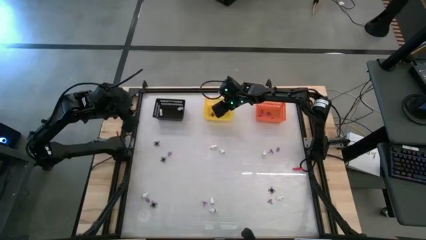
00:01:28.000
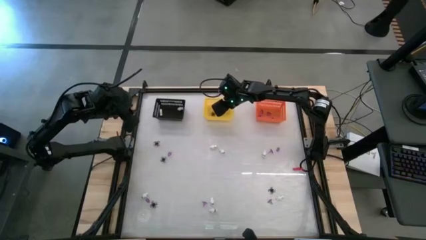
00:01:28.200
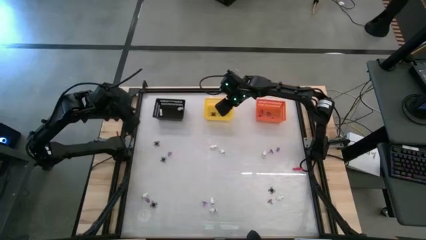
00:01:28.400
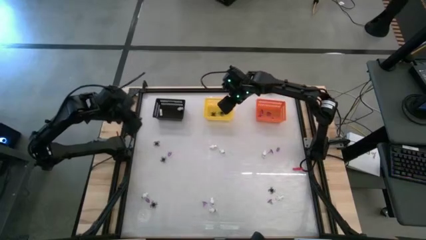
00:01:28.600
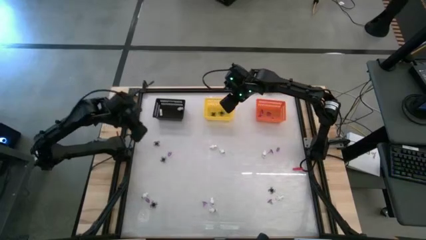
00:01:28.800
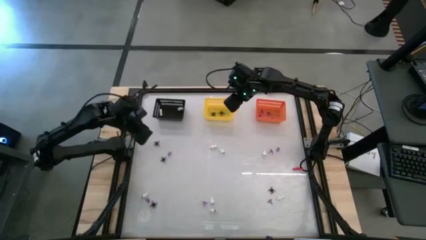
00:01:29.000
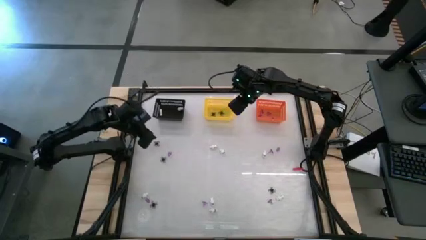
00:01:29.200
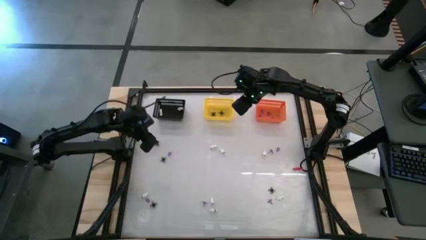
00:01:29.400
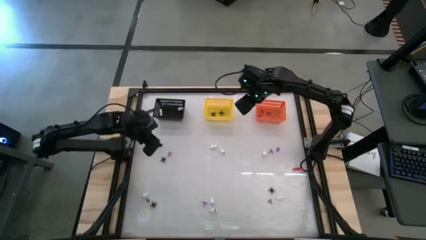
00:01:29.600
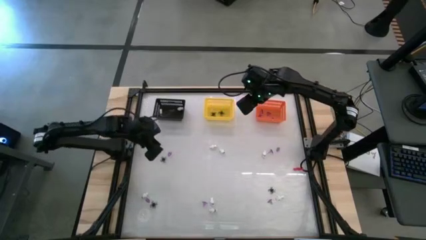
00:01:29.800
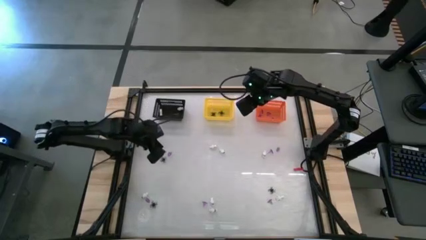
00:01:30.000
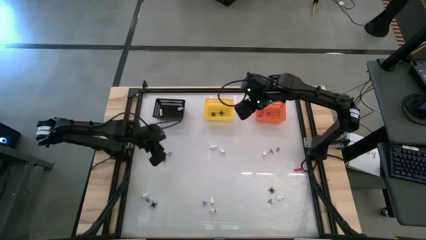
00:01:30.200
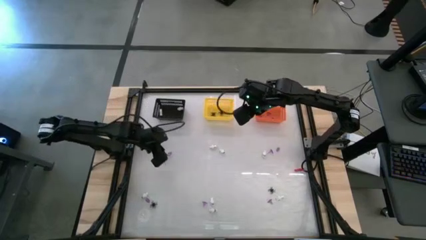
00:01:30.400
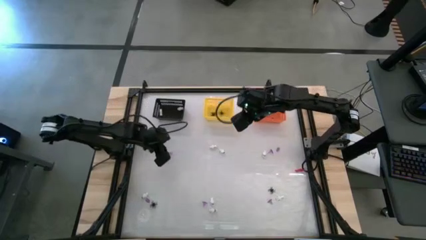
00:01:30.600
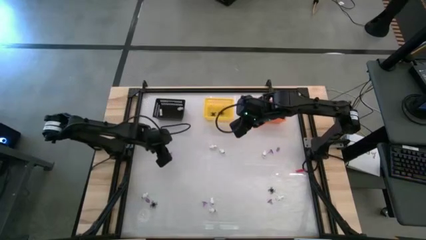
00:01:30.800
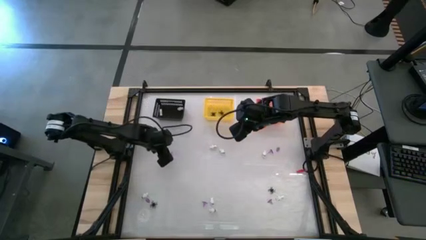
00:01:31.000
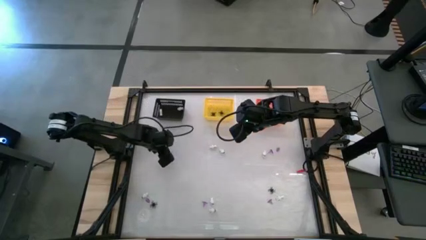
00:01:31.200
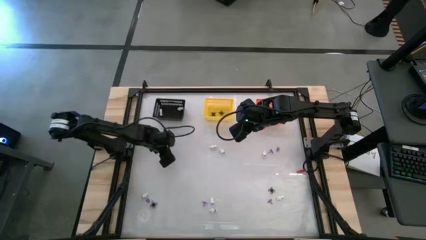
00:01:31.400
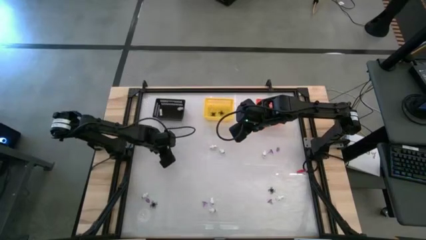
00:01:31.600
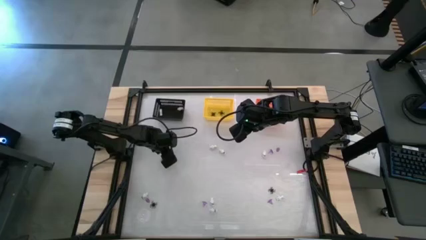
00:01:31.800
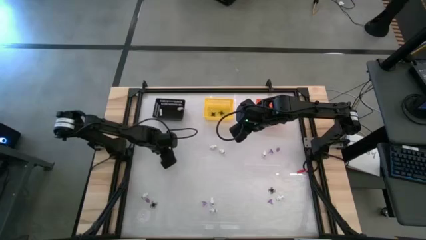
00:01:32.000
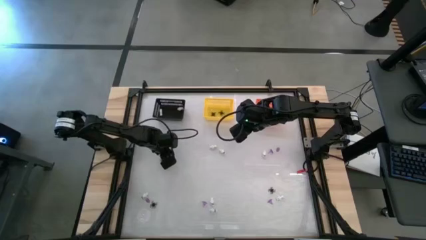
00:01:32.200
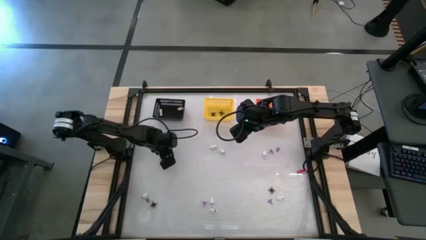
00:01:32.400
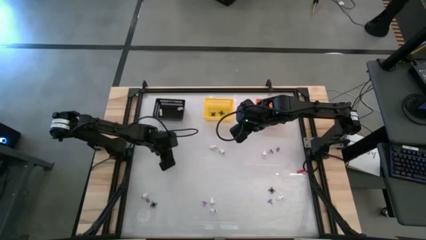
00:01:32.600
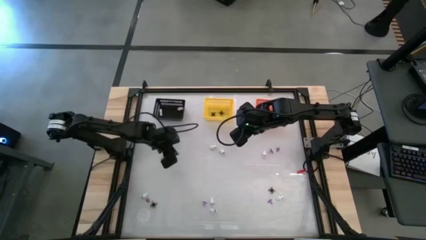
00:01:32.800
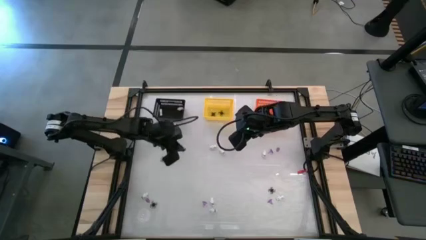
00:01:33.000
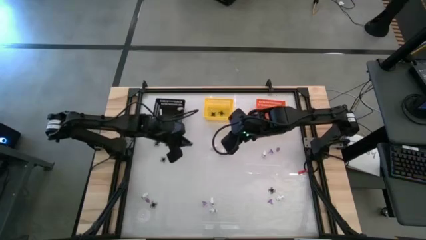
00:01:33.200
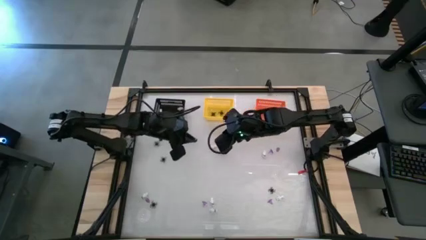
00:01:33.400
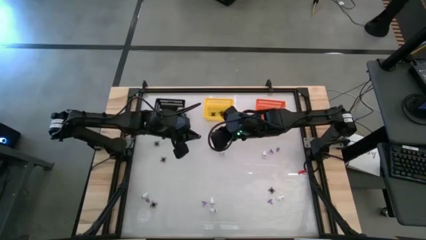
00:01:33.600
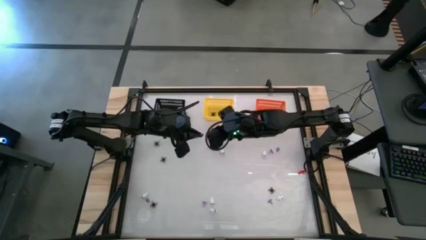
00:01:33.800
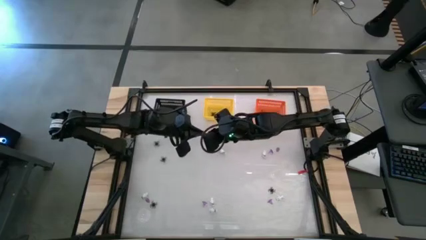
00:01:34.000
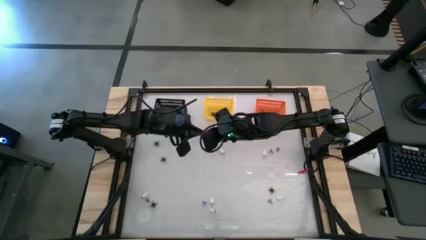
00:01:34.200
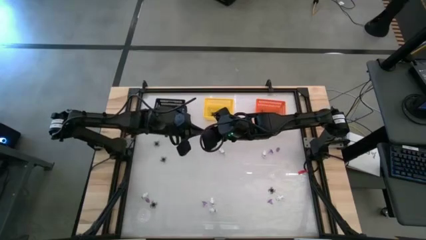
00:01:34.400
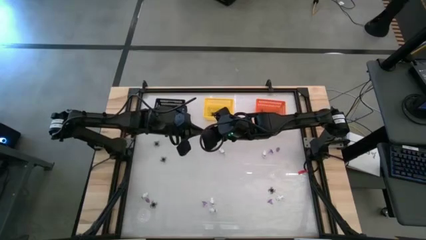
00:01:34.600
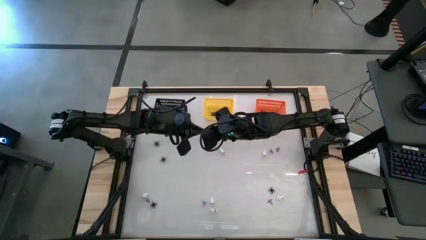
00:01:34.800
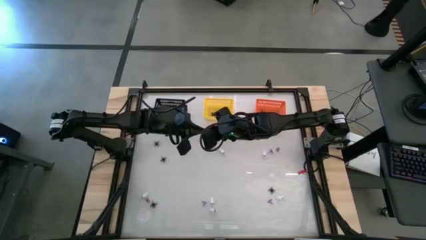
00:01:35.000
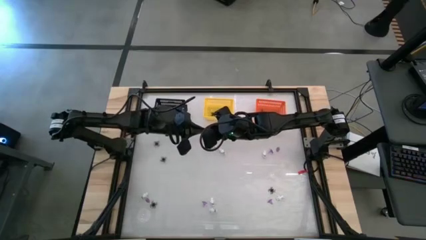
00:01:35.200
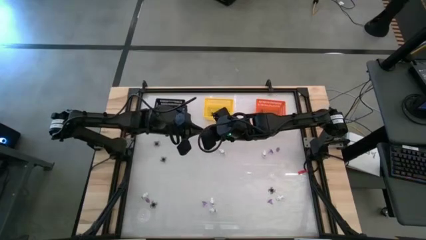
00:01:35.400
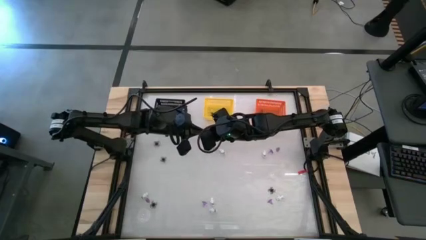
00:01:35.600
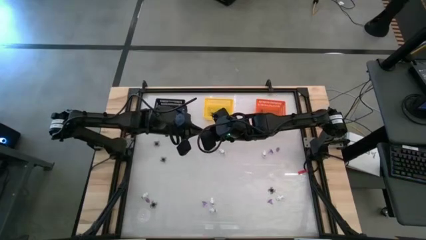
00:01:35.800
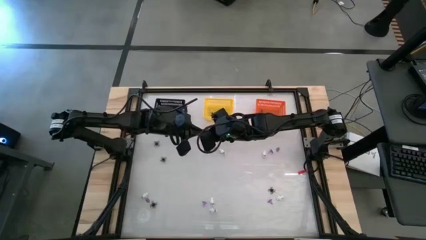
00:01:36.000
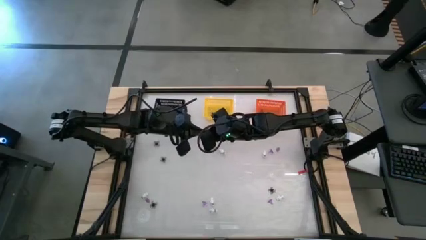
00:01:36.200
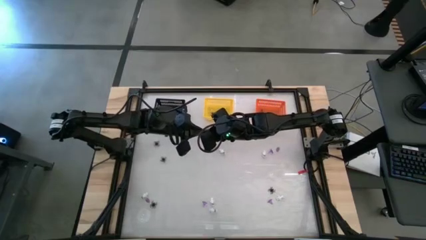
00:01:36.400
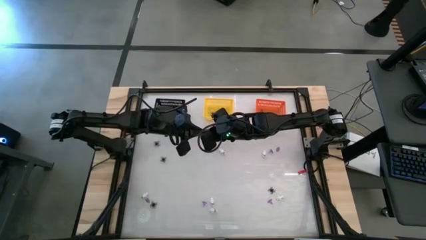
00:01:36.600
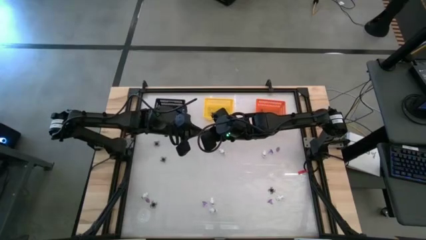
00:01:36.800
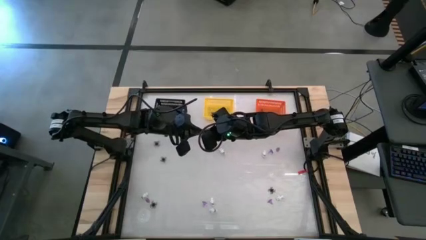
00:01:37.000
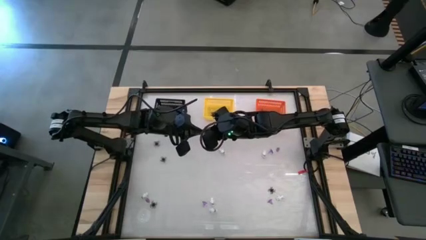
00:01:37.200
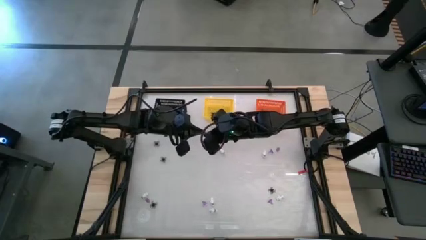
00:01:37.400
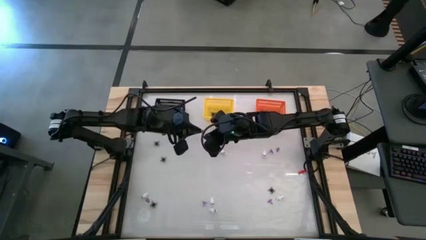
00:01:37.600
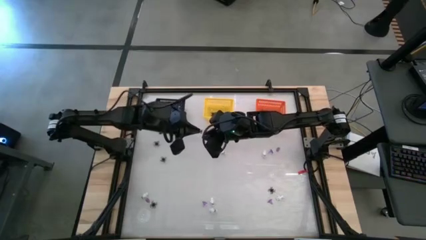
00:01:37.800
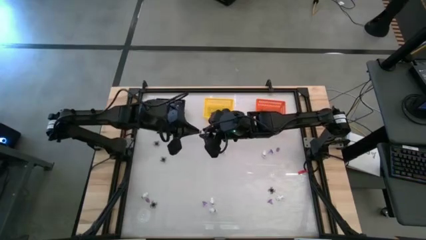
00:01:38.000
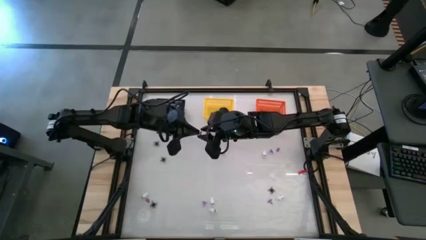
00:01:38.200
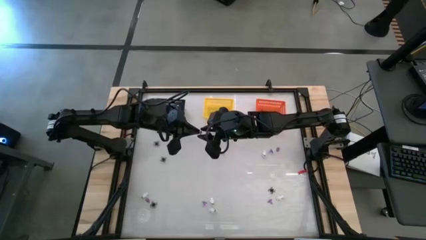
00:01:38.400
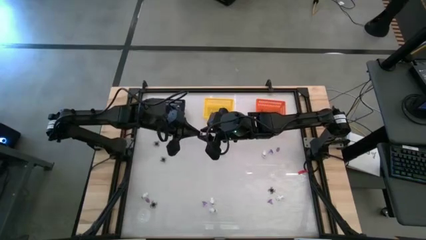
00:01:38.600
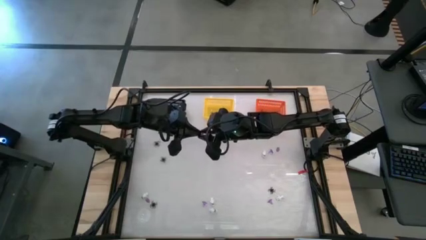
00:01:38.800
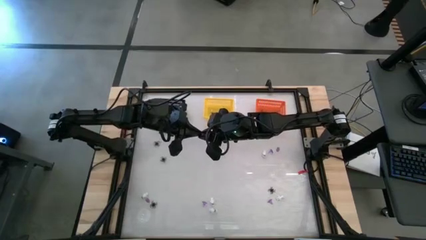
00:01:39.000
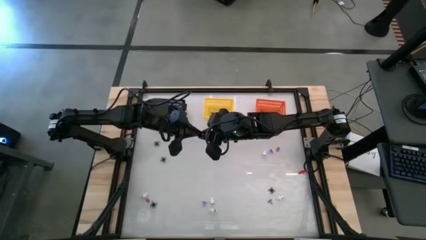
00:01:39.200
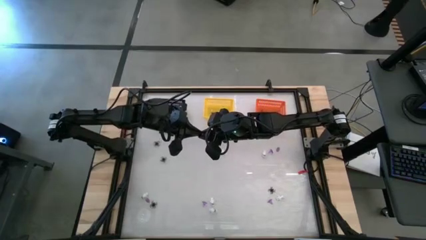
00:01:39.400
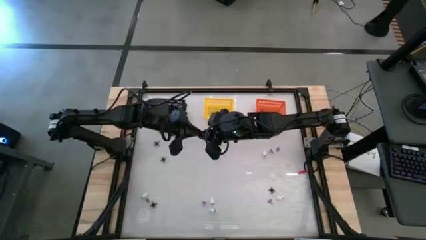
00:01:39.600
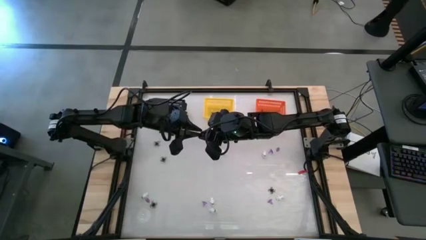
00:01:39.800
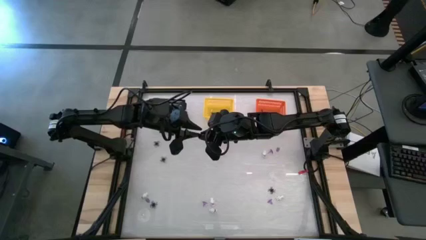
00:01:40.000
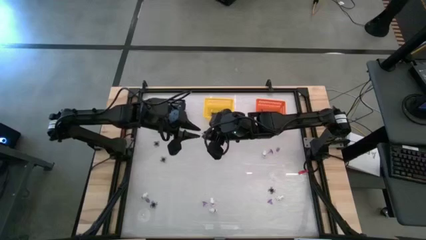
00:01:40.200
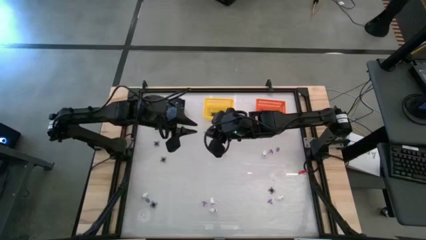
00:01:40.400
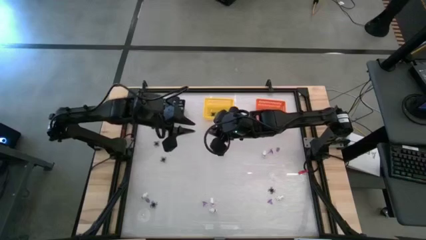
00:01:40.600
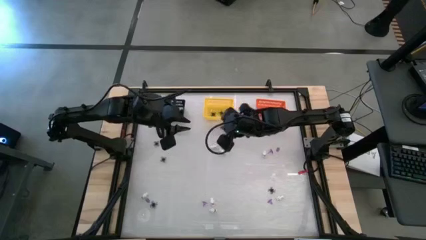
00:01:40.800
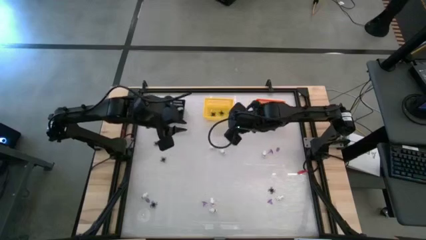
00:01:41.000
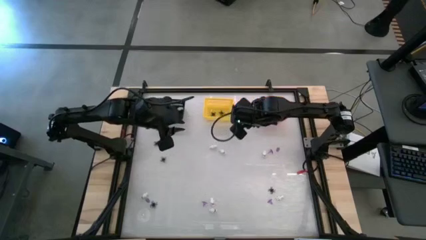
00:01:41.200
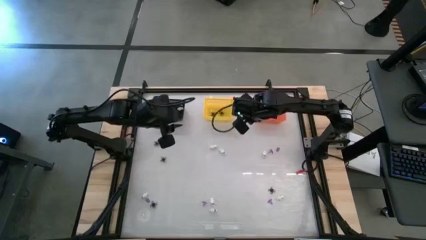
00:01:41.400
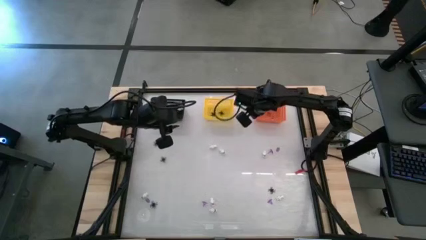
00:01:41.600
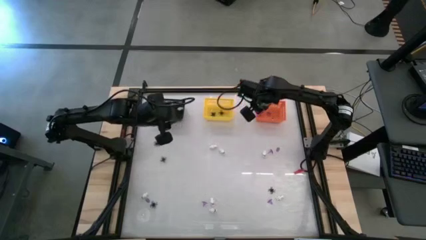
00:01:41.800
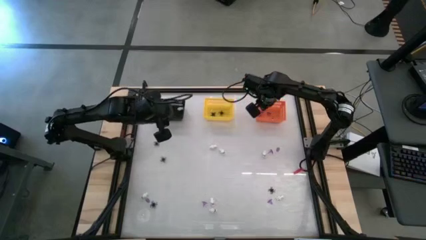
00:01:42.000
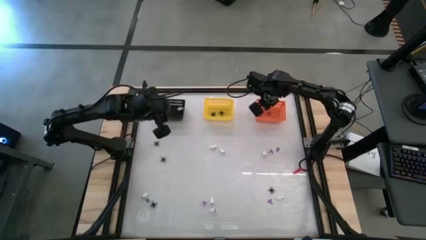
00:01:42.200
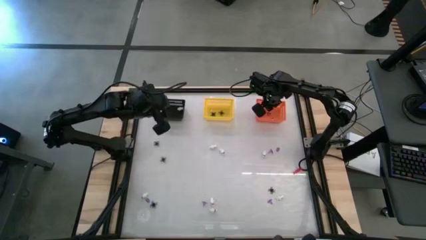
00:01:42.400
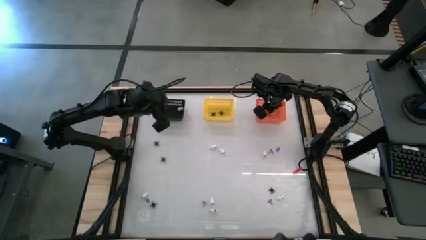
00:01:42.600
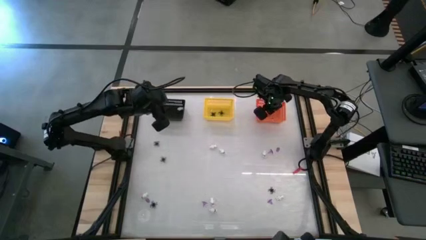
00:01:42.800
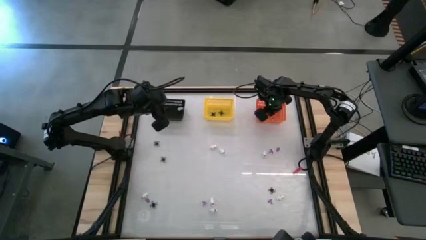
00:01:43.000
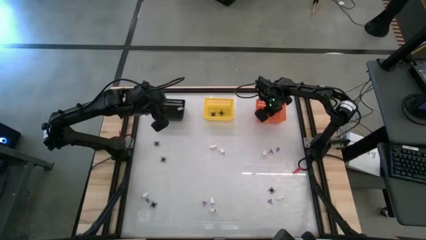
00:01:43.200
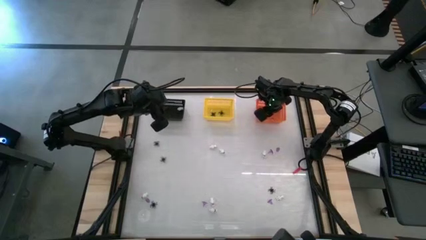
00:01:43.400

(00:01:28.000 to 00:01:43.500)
Task: Sort Halloween decoration
Put the purple witch hat toy into the orange basket
